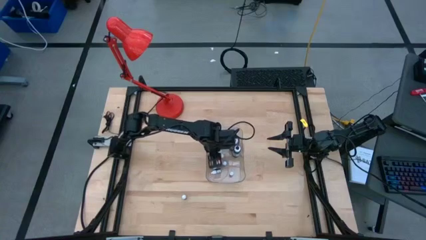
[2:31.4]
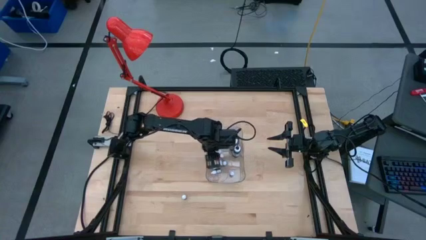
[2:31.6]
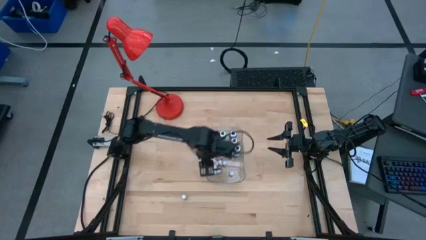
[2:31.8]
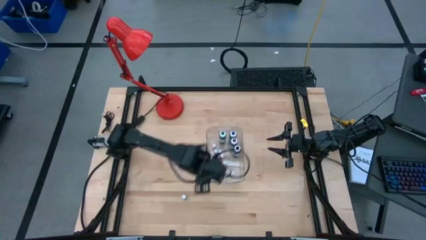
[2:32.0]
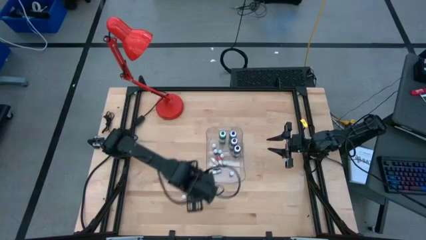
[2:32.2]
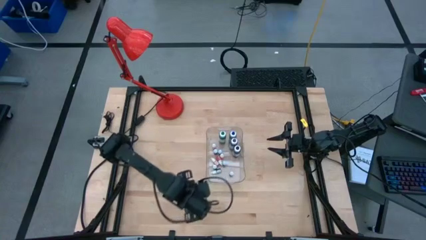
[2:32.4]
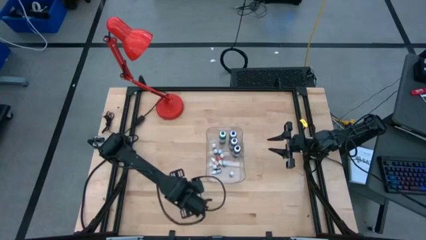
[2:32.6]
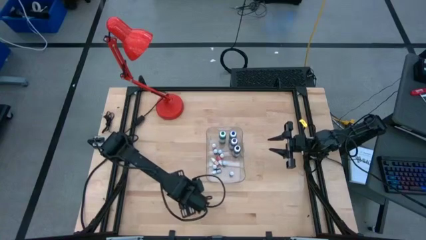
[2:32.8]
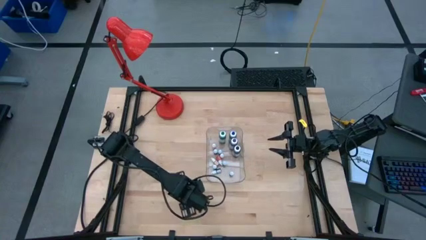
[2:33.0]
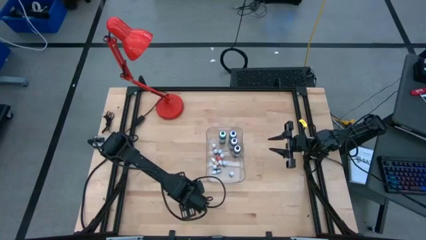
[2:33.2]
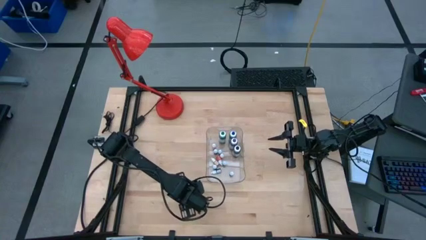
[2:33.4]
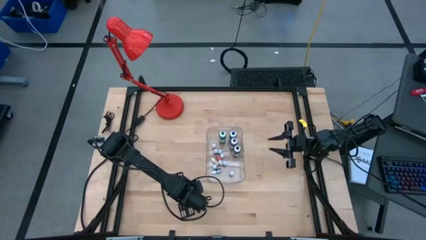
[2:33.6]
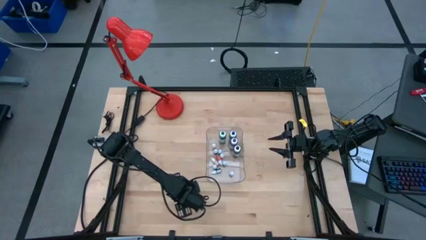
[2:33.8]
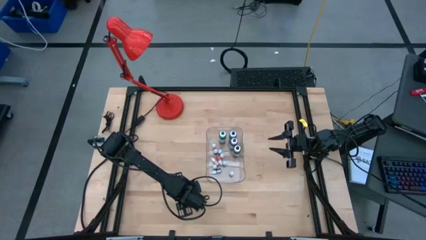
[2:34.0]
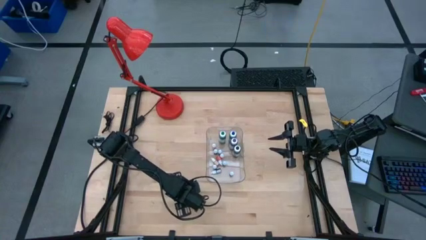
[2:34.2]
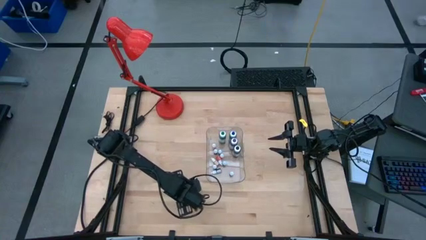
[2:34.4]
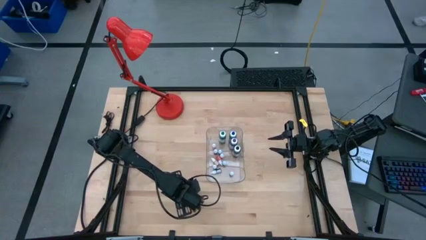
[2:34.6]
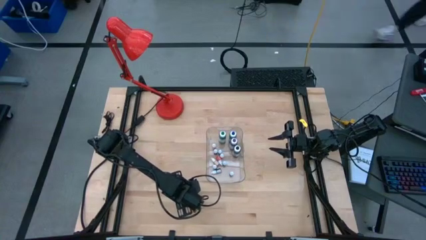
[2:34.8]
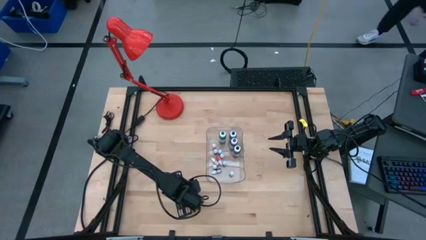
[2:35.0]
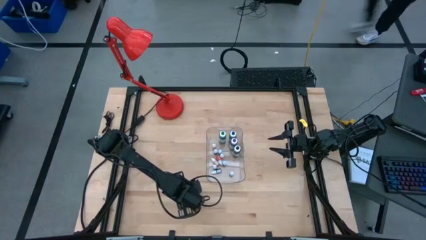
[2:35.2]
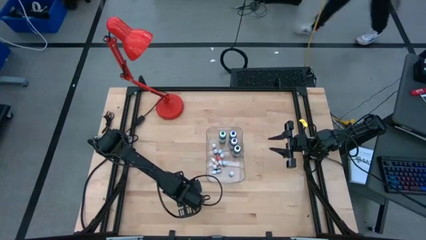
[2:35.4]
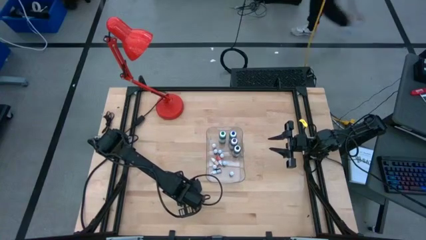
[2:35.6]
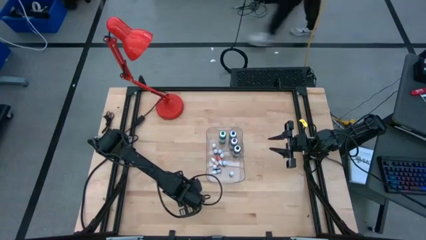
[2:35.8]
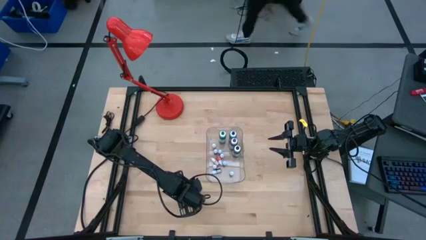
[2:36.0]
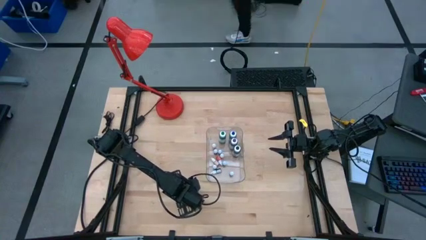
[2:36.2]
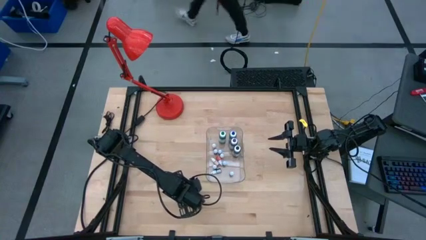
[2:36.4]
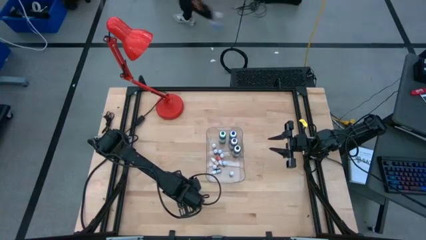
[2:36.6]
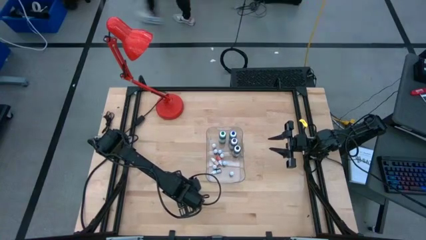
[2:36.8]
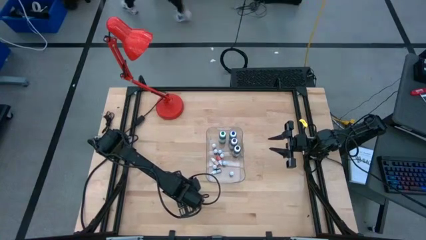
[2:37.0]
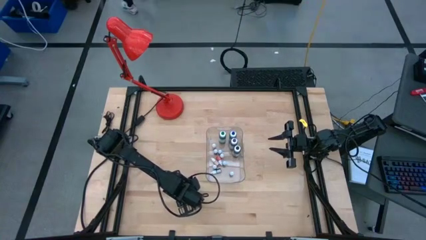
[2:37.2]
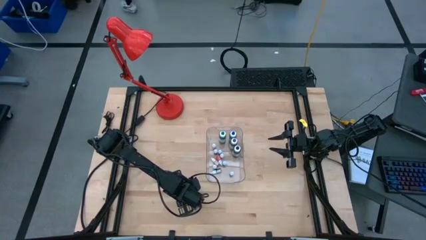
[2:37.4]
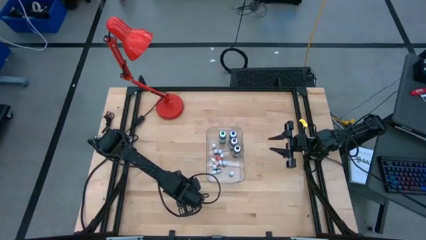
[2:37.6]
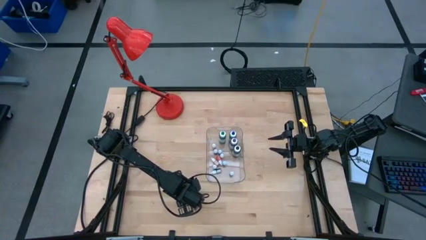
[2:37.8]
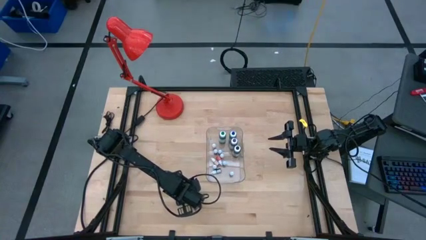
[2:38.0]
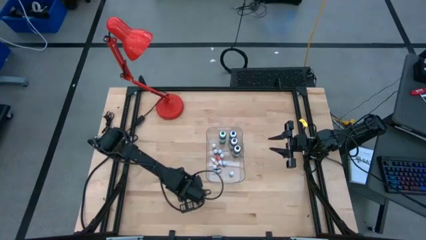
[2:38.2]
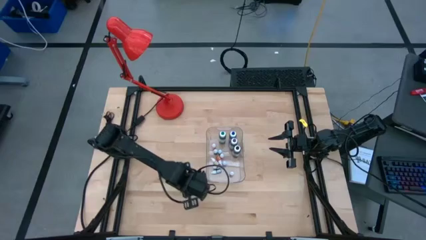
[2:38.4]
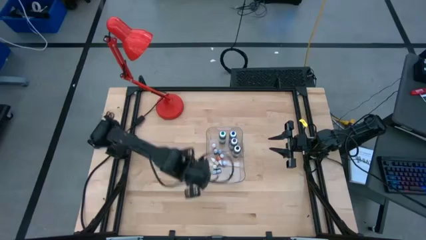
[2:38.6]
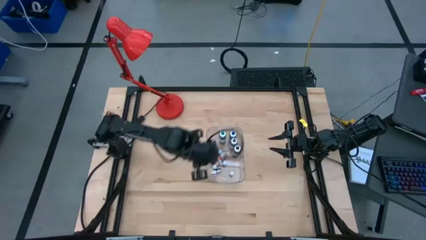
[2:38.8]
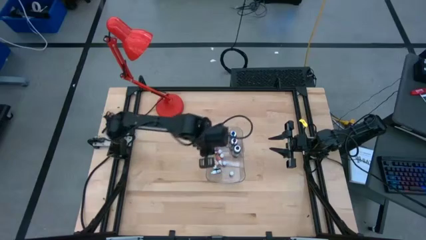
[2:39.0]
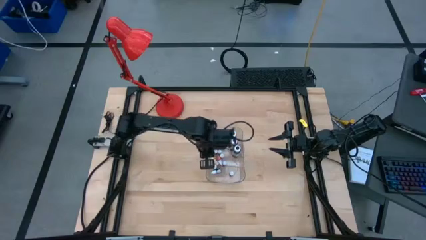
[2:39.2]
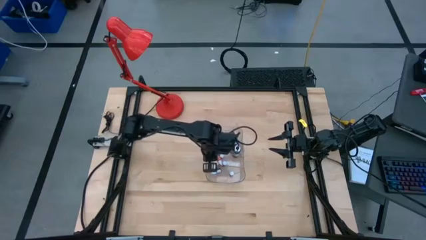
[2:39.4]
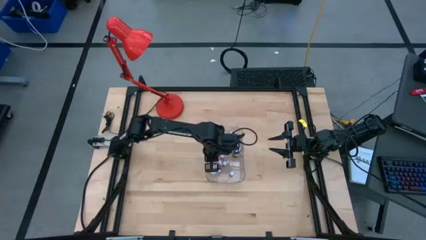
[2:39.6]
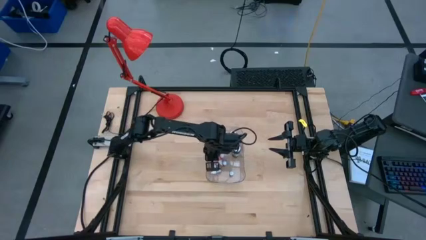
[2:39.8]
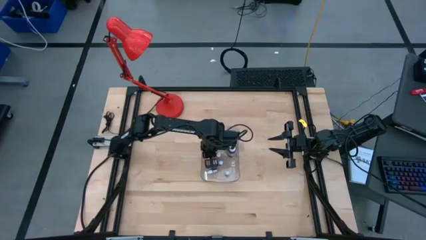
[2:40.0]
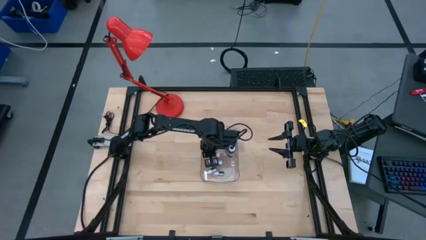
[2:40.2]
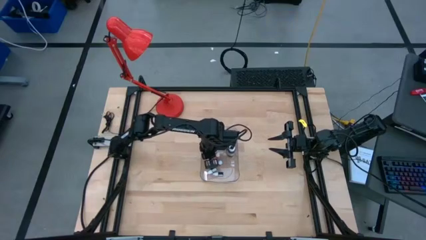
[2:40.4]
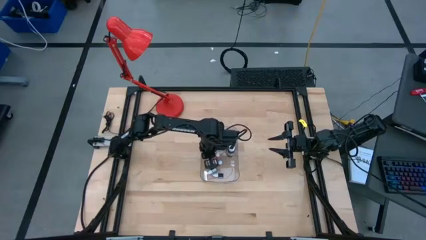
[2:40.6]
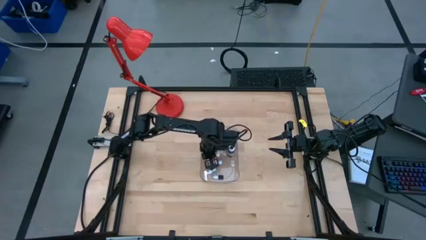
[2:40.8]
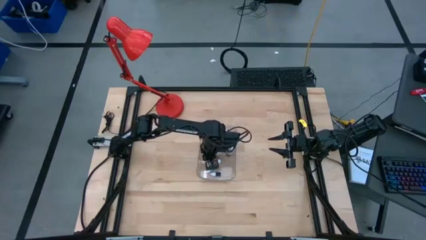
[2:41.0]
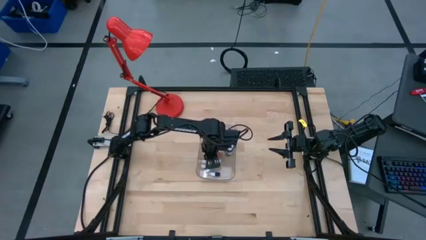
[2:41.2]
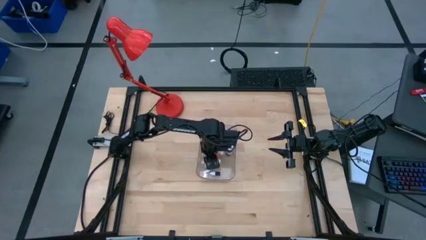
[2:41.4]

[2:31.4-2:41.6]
Task: Pick & Place food coloring
Put the orange food coloring bottle into the transparent container

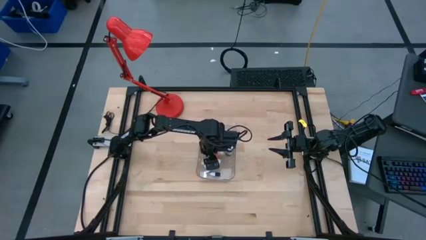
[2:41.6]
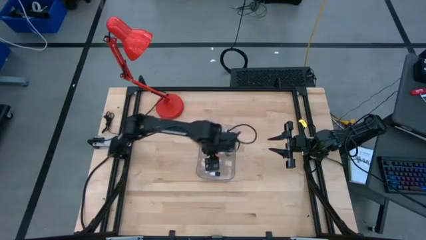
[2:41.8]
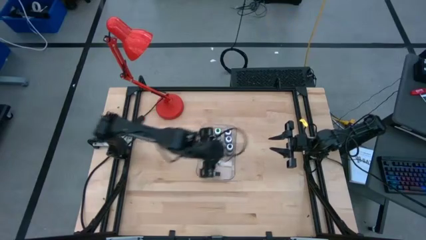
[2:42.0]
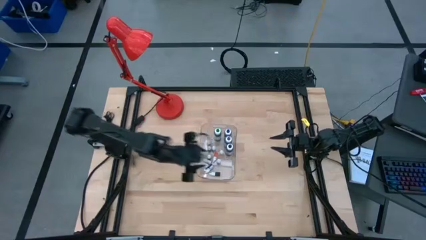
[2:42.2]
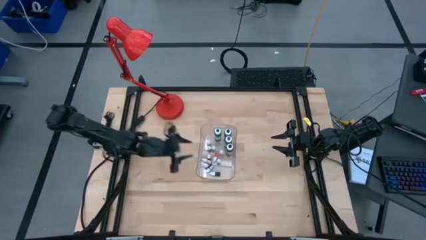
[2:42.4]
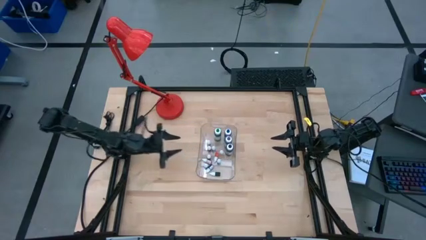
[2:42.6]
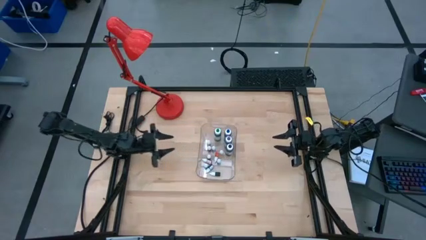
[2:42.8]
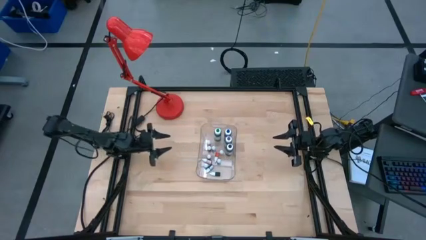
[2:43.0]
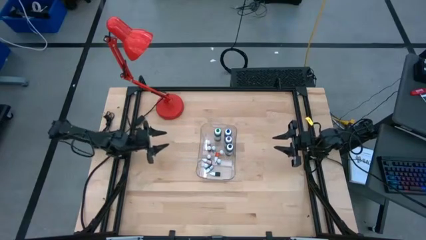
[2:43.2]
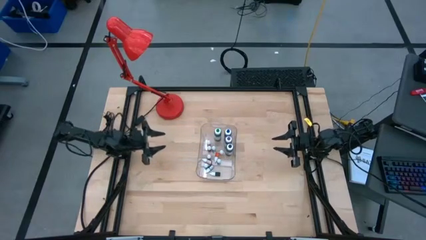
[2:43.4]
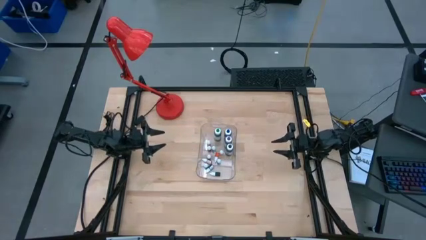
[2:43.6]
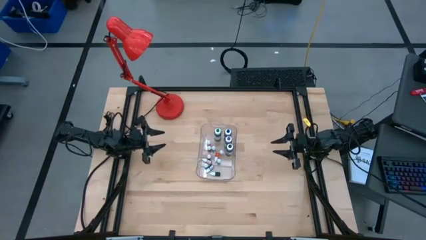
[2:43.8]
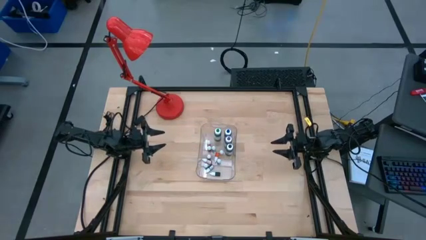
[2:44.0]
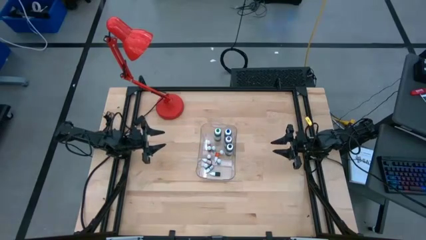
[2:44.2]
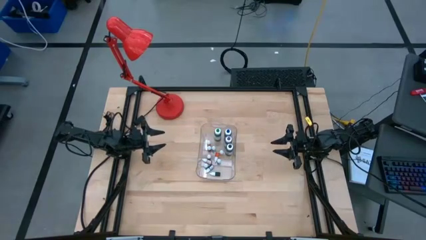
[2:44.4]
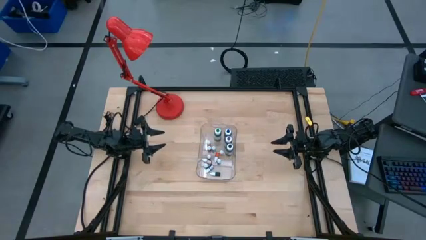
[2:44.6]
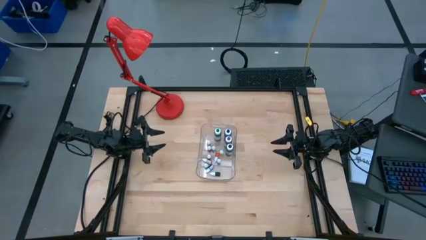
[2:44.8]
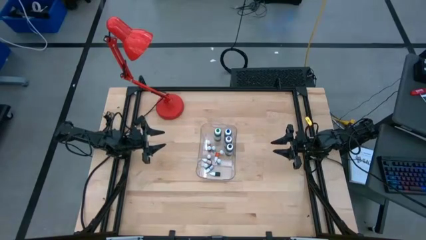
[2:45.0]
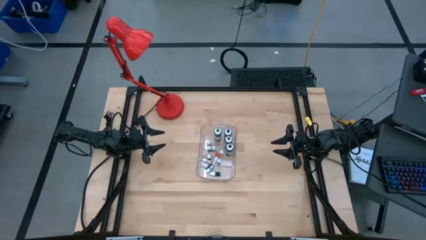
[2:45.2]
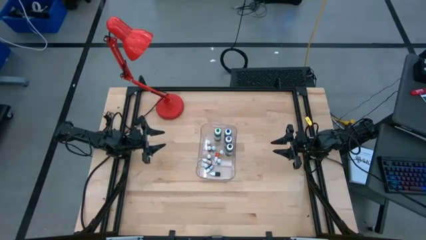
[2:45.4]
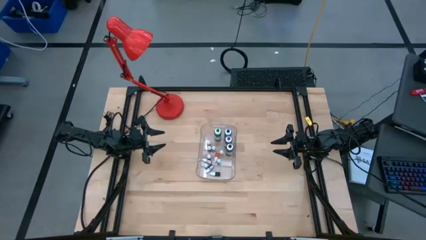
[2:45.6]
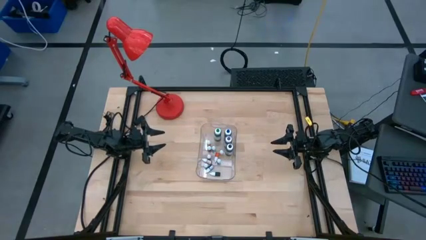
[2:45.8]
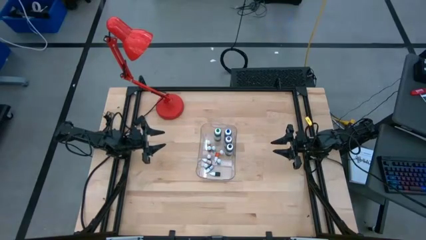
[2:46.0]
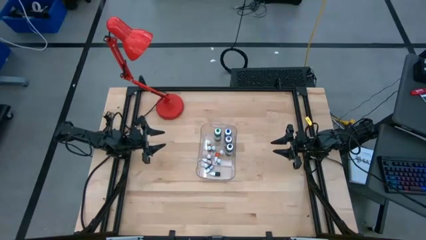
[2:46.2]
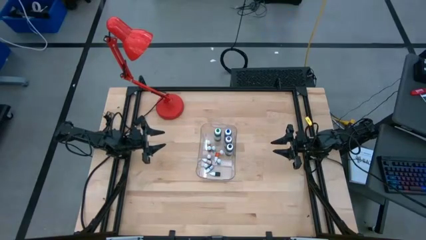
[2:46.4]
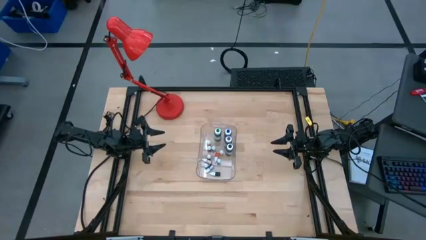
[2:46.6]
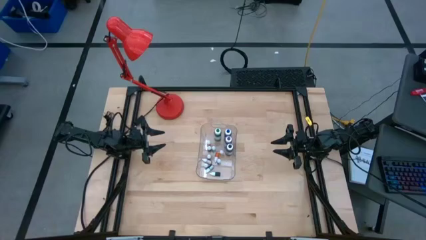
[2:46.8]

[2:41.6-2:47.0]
Return to Home Position
